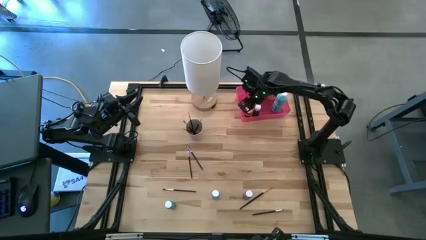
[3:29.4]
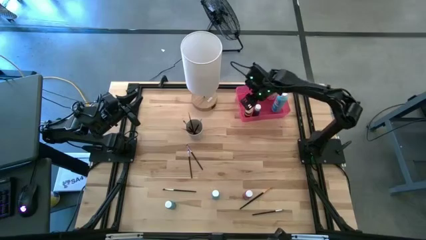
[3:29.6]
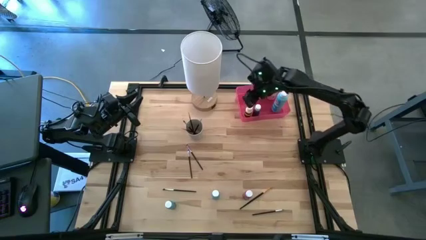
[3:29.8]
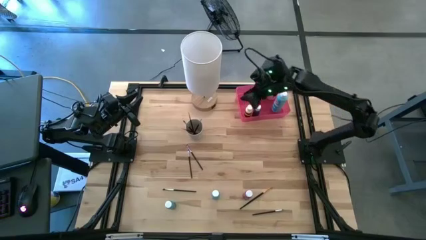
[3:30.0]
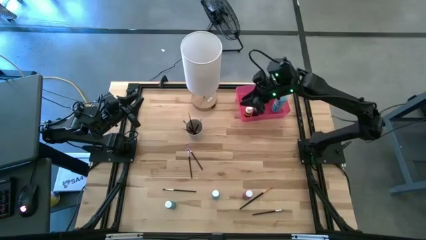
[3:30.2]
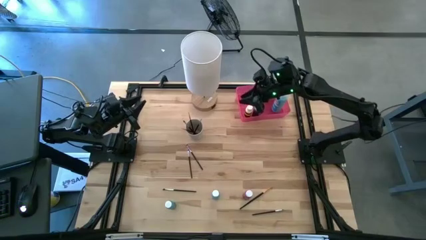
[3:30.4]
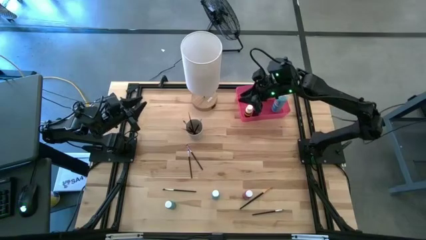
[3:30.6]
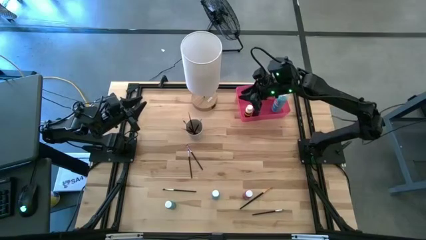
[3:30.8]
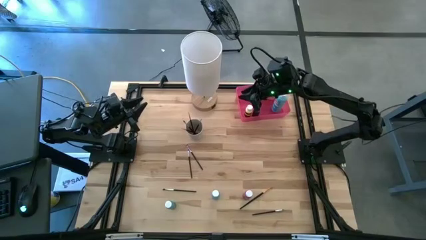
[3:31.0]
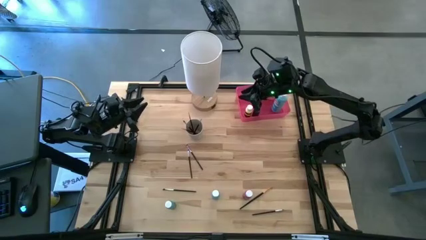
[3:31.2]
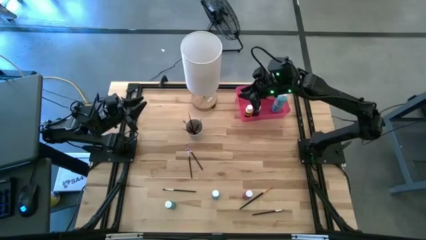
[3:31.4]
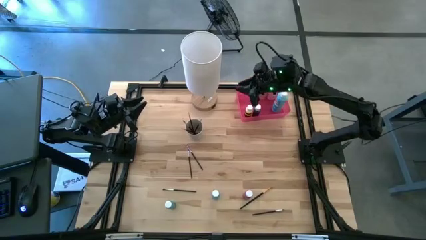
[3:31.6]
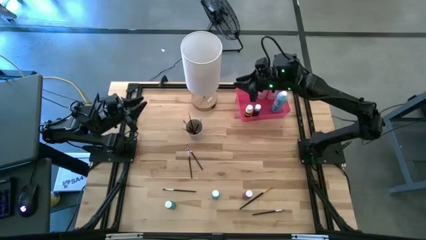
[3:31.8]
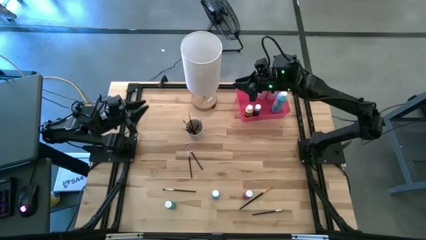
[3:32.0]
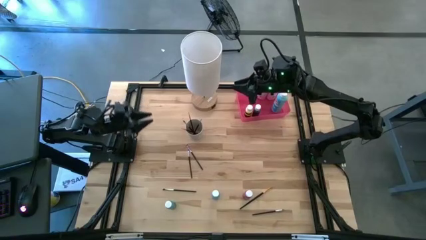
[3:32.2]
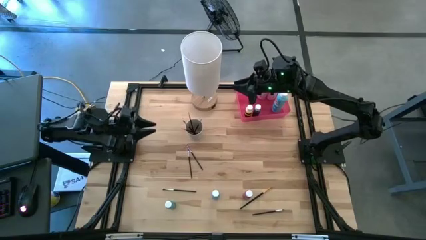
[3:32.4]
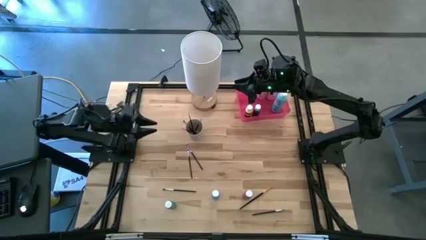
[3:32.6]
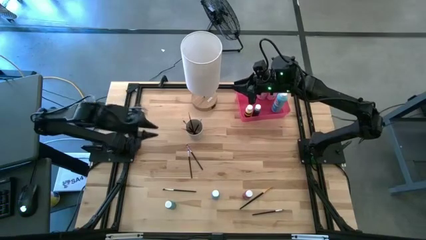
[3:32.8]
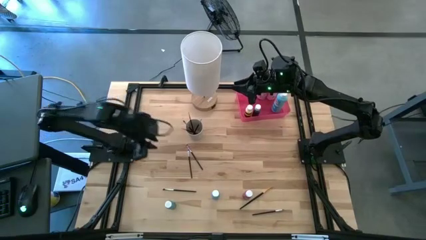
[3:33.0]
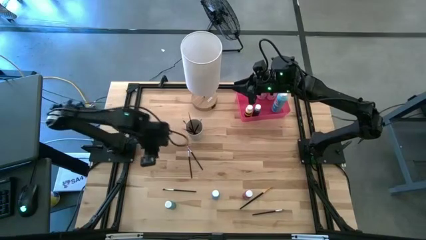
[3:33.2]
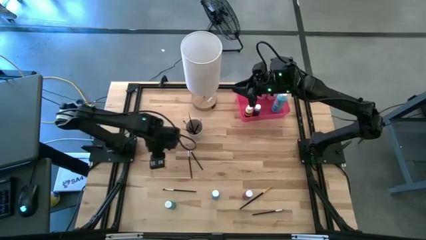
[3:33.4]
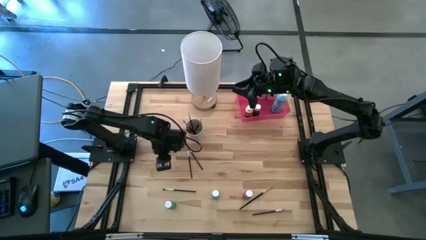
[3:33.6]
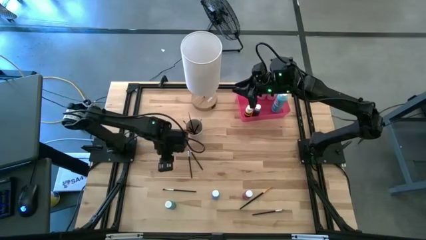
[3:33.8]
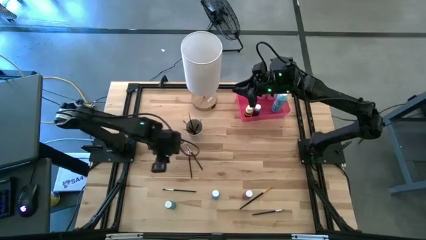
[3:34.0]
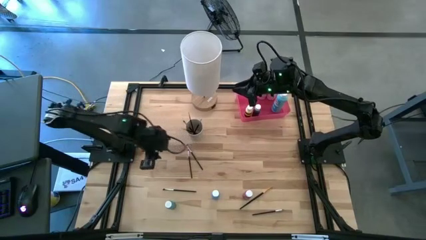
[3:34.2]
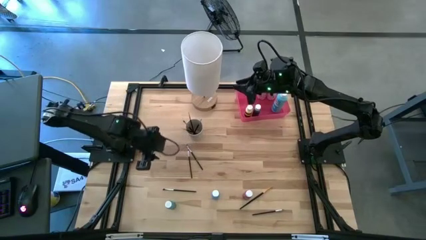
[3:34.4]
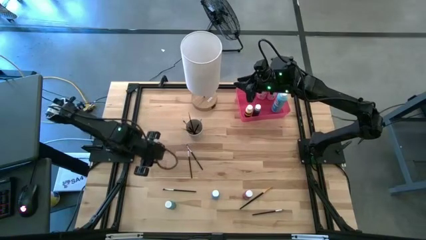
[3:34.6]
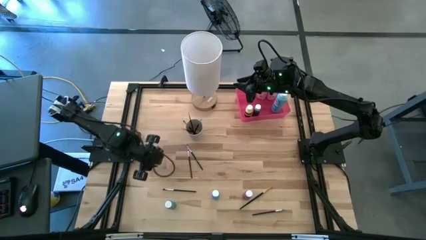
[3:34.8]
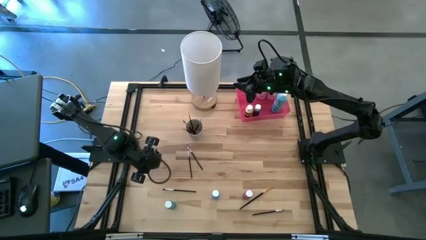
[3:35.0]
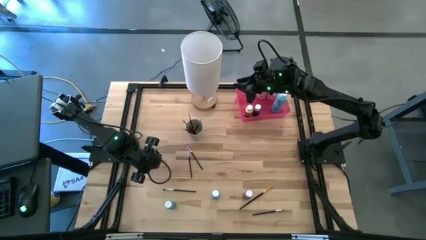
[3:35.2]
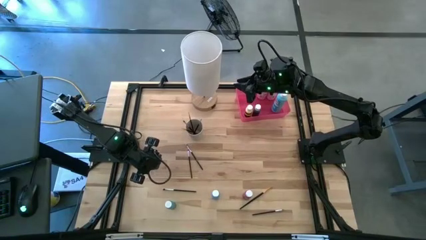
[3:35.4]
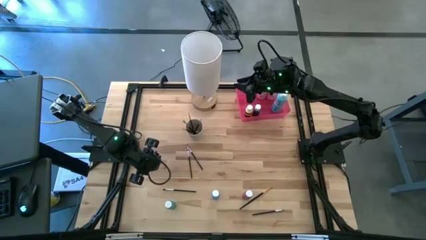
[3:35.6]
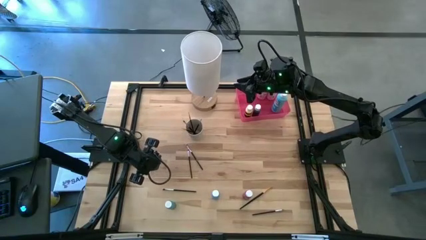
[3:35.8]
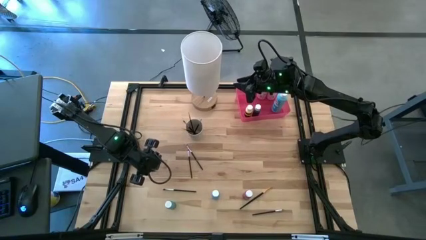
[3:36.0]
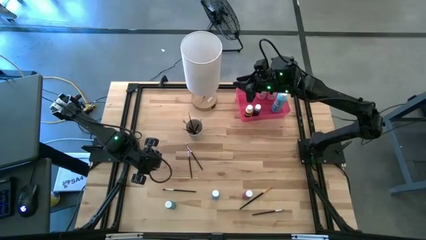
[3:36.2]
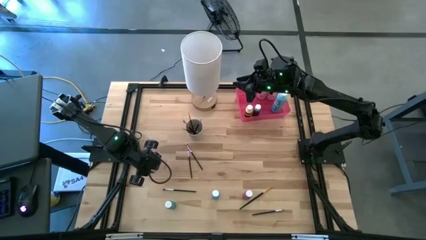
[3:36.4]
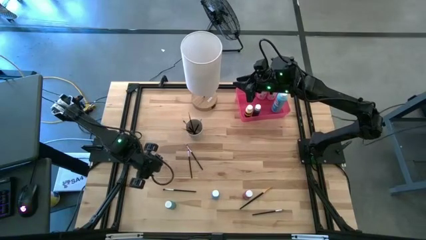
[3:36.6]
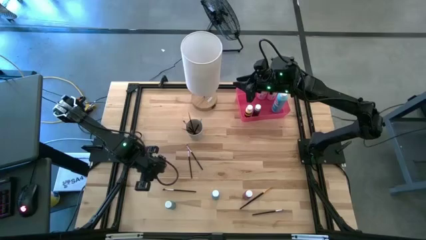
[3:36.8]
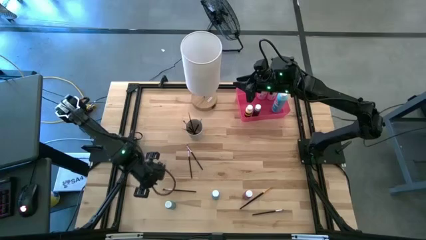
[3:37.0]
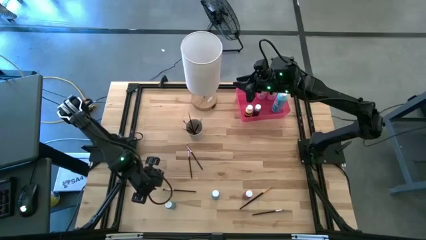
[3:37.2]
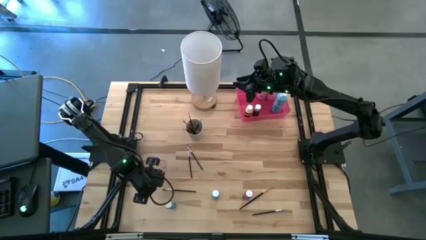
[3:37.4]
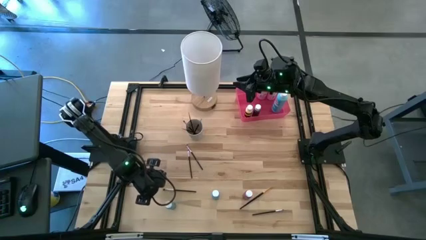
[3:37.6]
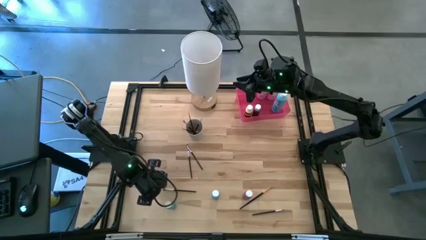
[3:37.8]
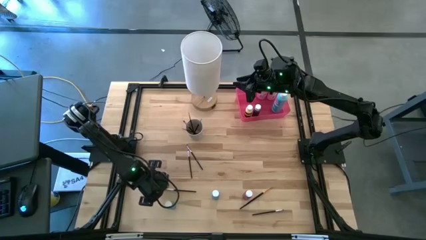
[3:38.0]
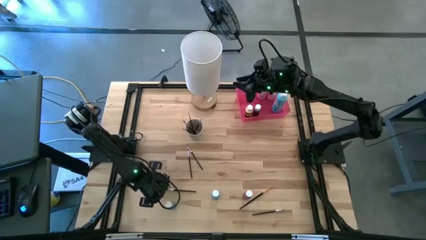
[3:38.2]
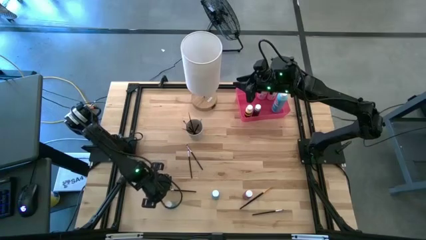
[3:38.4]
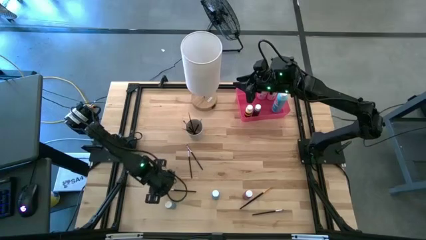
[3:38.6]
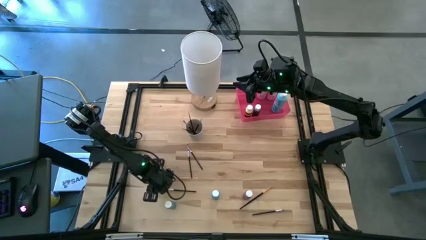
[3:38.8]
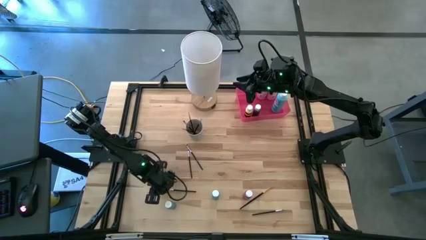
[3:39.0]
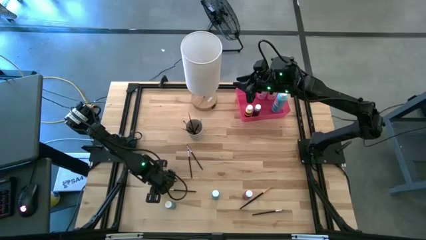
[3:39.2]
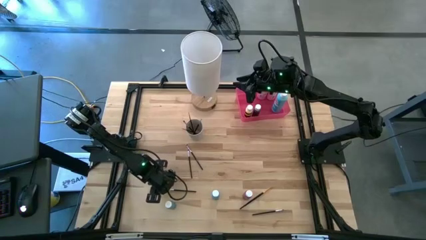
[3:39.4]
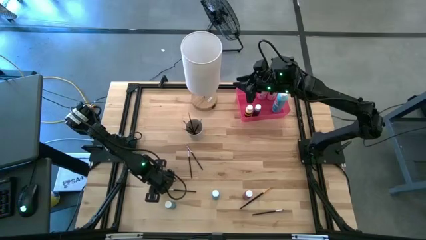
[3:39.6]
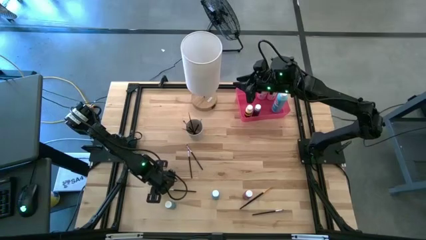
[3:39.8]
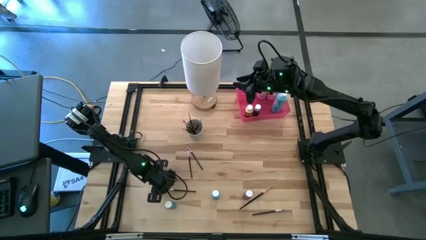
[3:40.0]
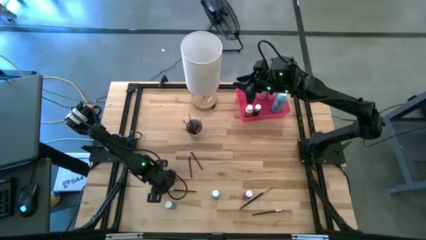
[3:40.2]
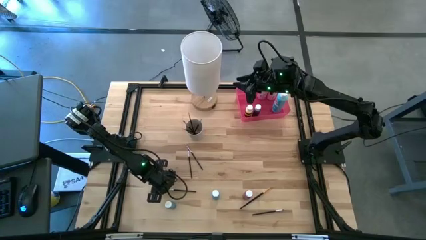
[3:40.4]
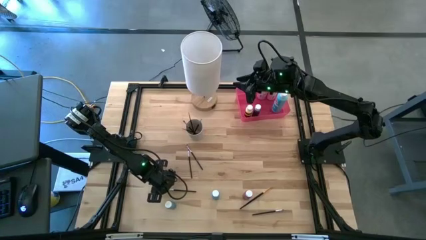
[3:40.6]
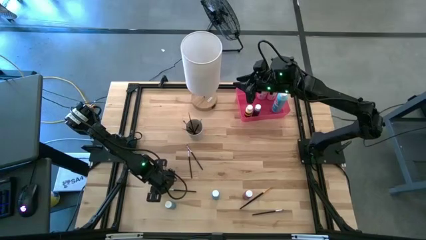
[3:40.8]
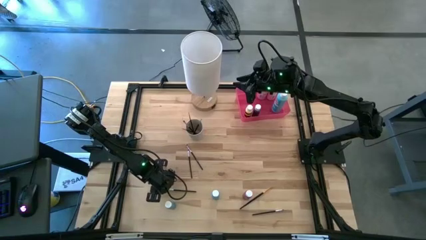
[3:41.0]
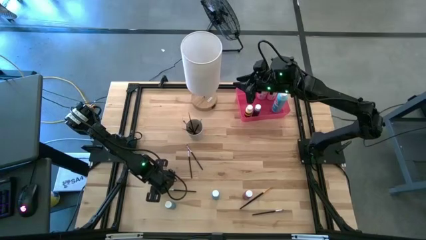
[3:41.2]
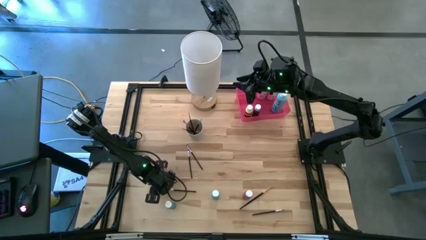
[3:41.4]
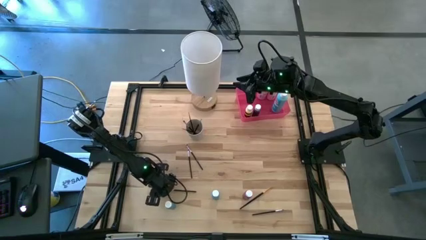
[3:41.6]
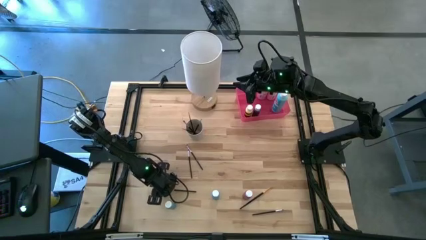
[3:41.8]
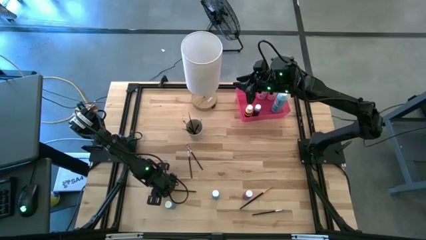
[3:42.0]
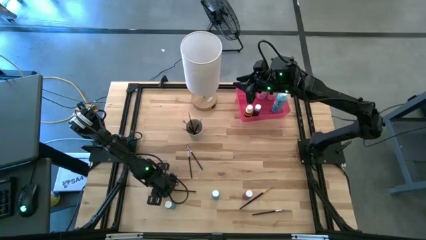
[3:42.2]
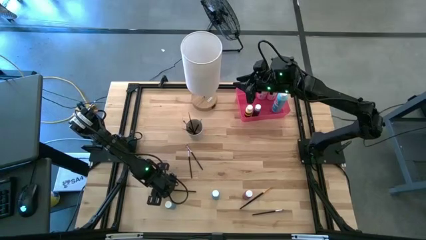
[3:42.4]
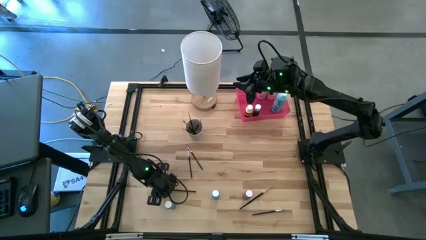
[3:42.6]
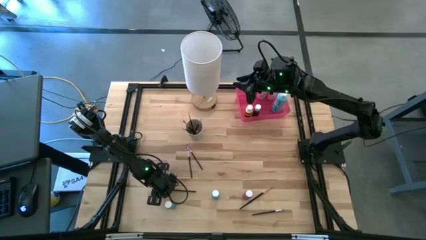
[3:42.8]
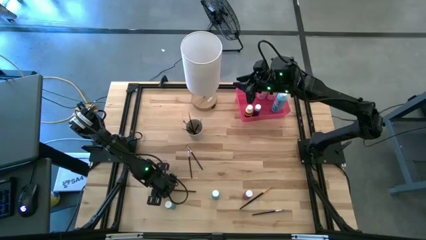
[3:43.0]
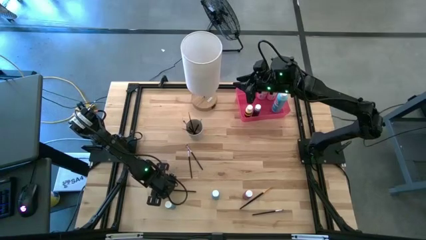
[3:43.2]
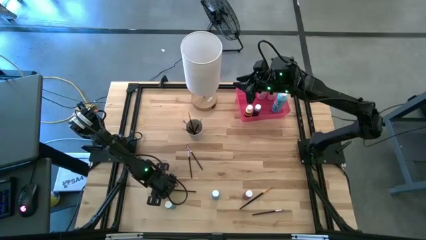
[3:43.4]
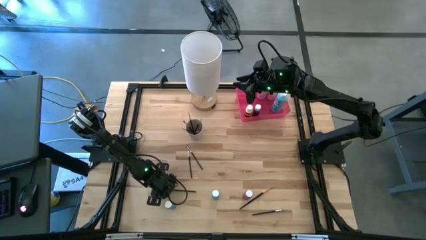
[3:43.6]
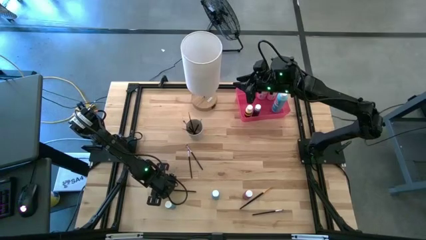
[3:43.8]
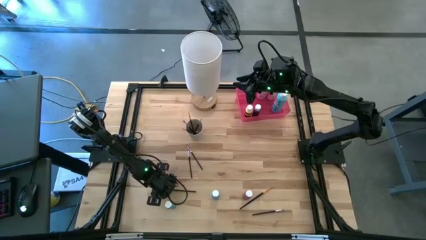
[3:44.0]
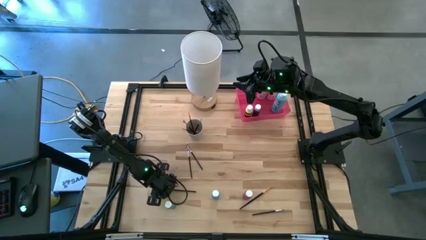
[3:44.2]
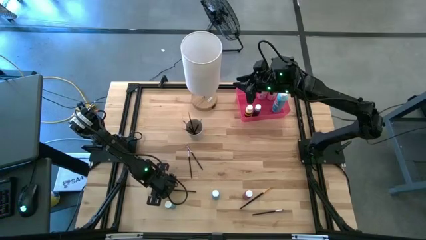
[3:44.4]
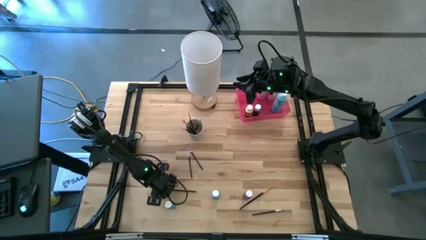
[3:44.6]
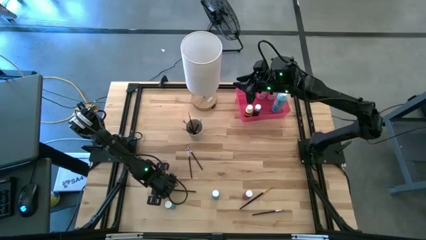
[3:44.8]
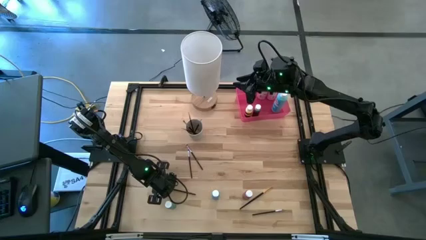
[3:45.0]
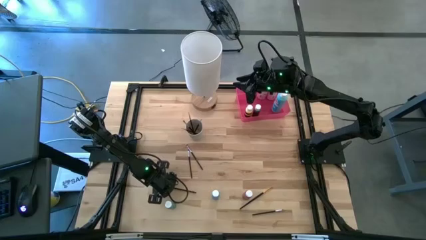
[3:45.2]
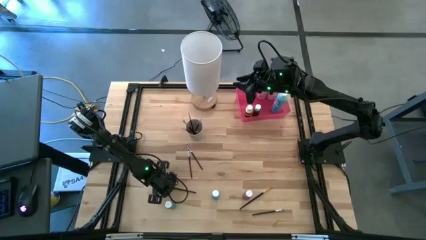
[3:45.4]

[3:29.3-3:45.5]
Task: Pick & Place Paint Supplies
Put the silver eyeshadow brush into the white cup
